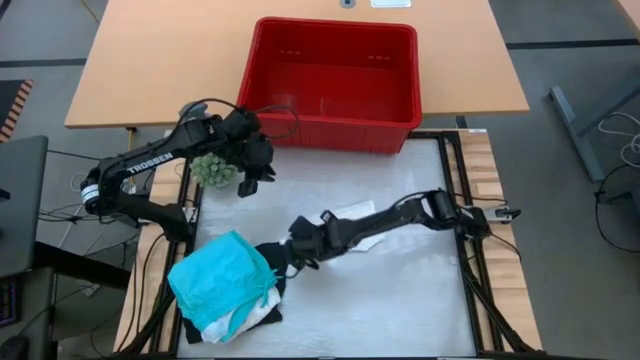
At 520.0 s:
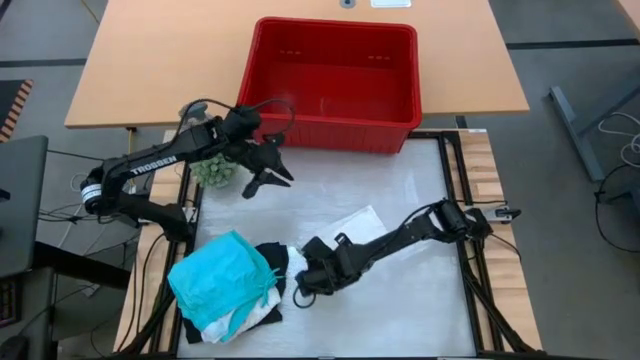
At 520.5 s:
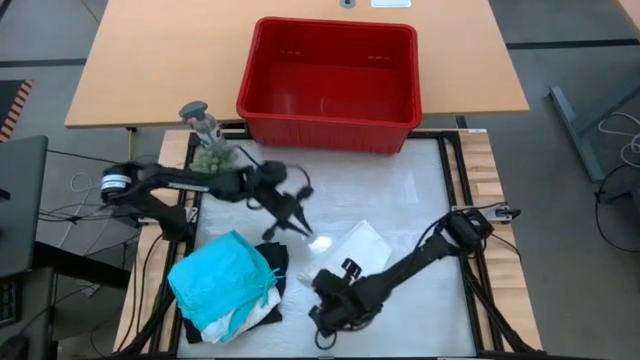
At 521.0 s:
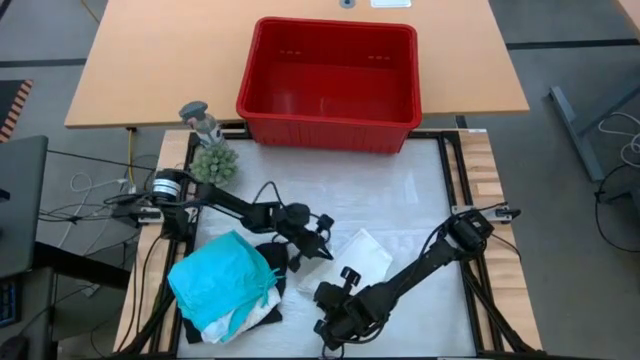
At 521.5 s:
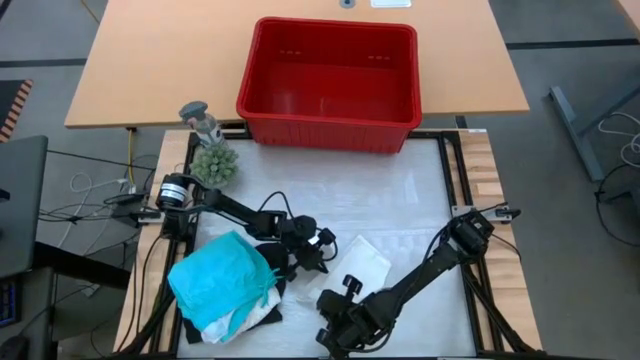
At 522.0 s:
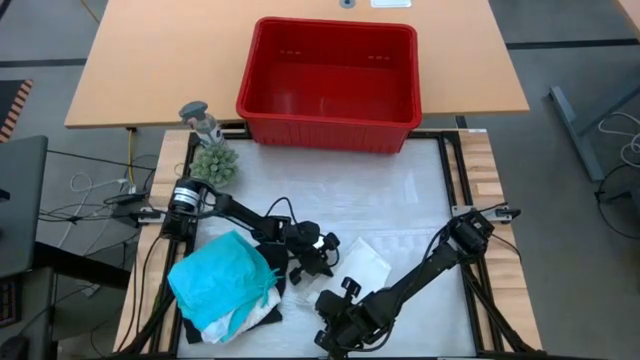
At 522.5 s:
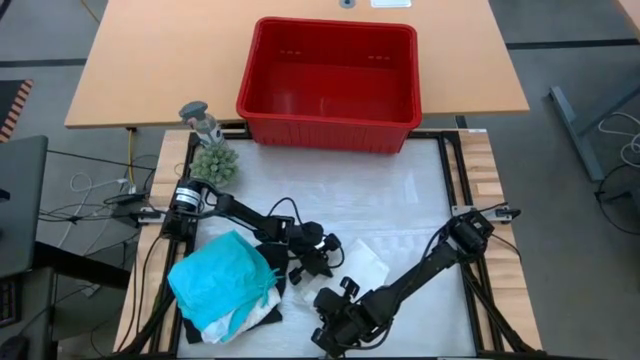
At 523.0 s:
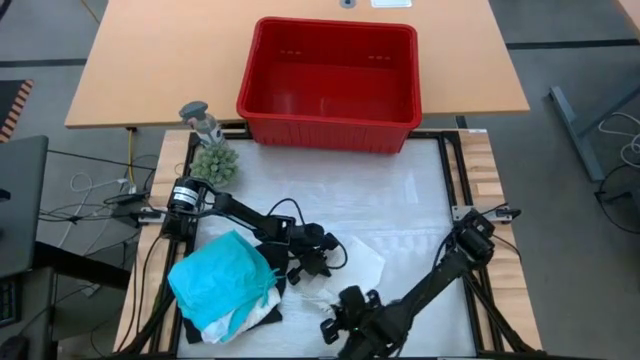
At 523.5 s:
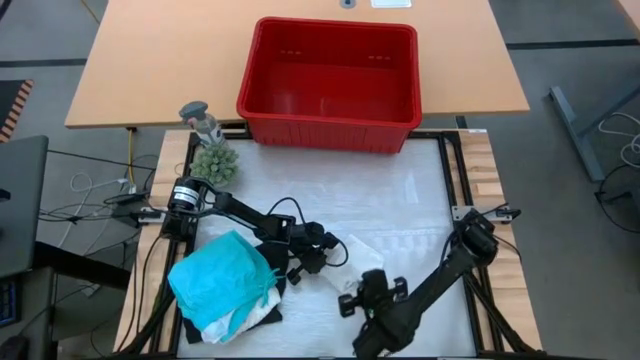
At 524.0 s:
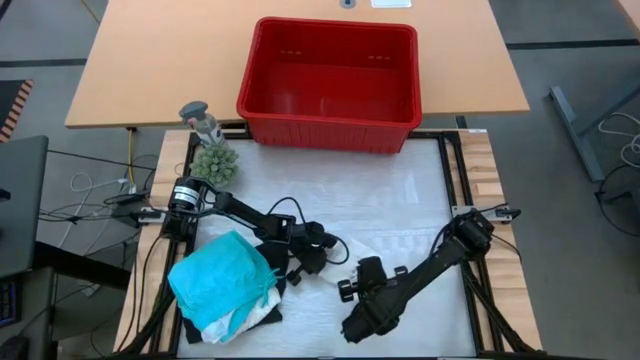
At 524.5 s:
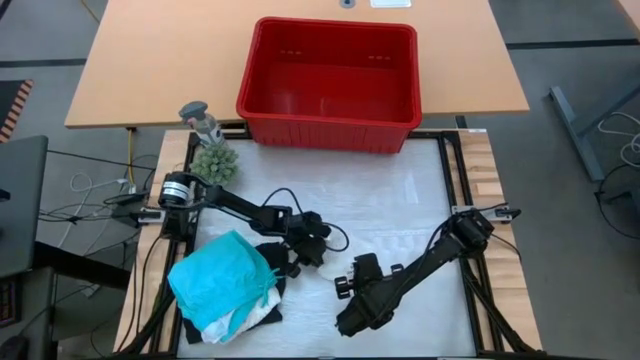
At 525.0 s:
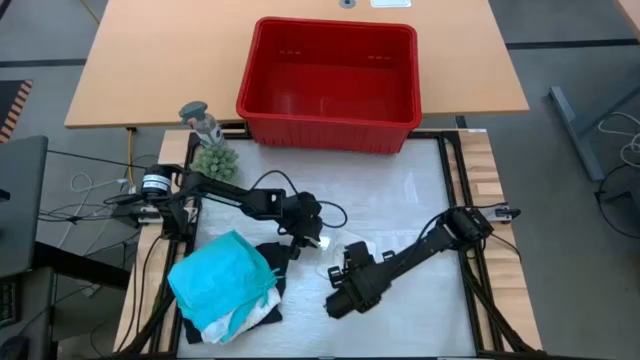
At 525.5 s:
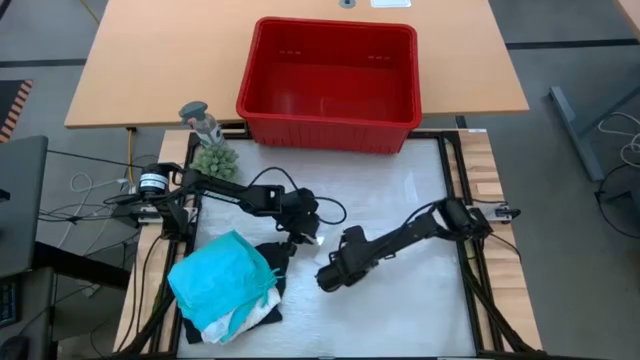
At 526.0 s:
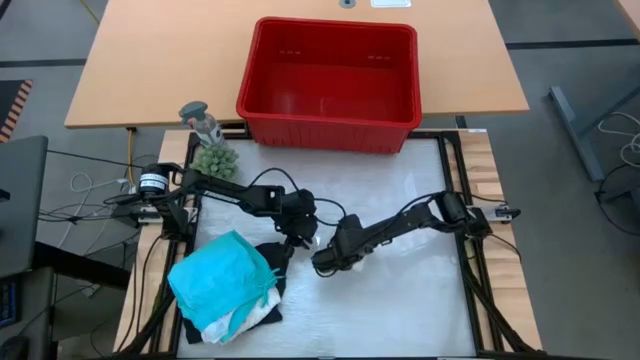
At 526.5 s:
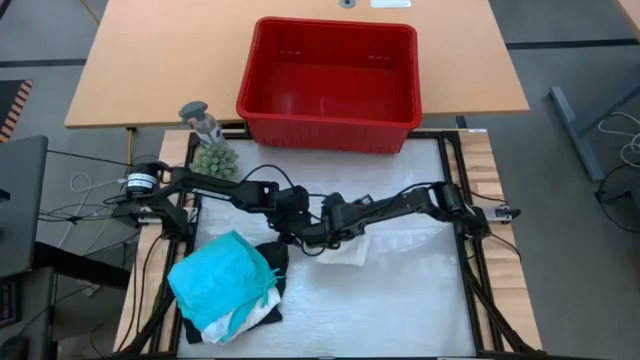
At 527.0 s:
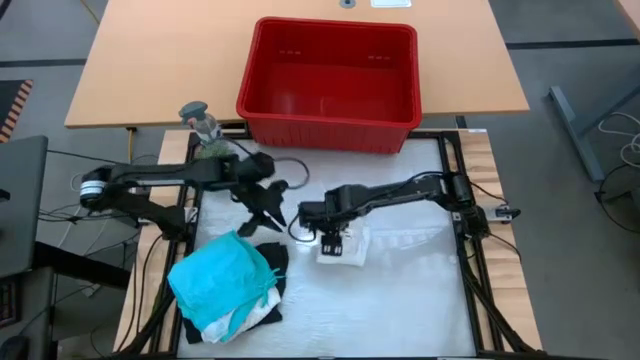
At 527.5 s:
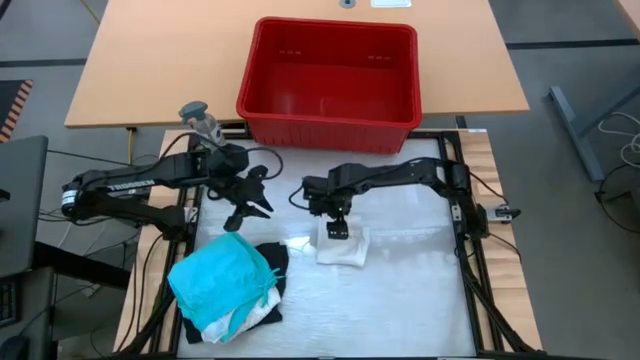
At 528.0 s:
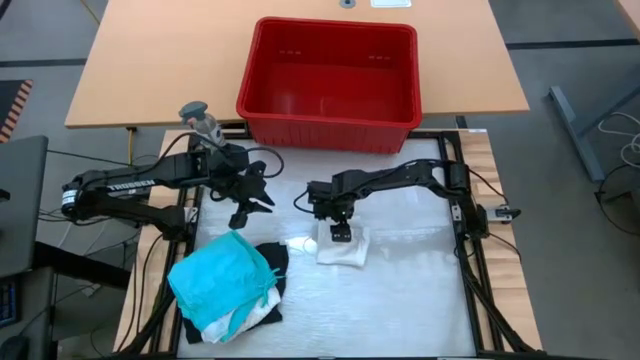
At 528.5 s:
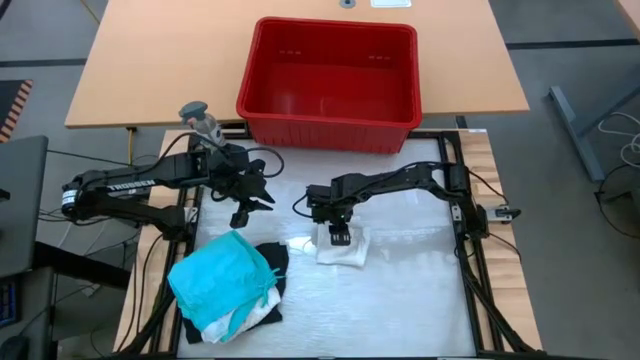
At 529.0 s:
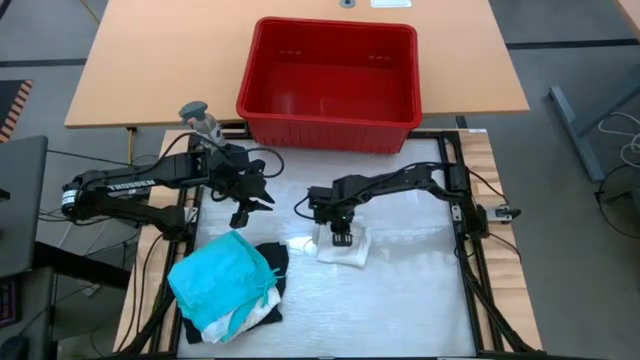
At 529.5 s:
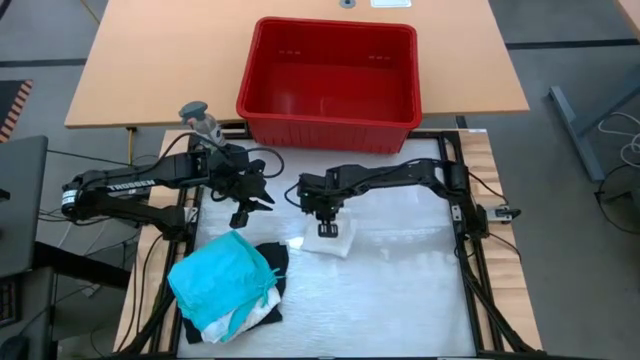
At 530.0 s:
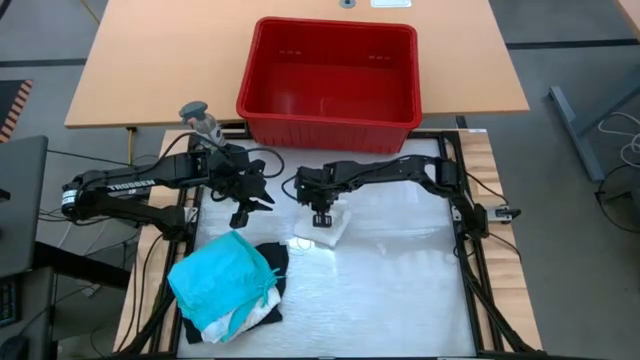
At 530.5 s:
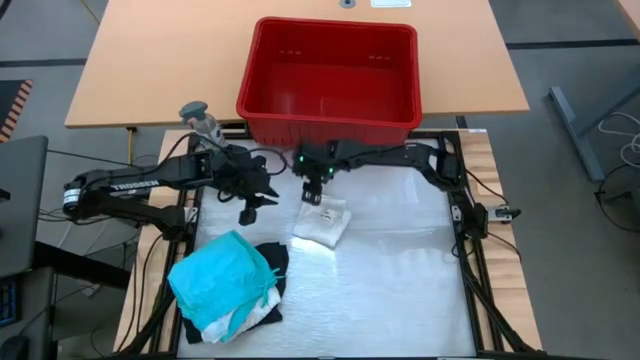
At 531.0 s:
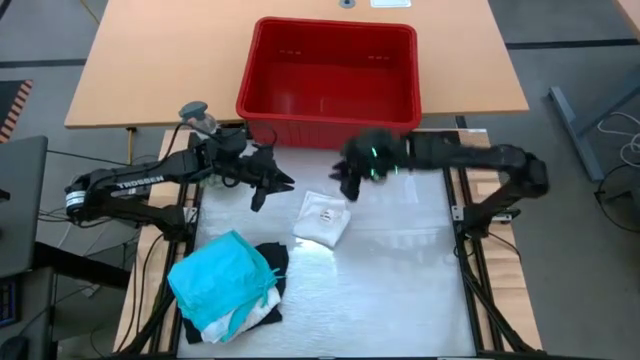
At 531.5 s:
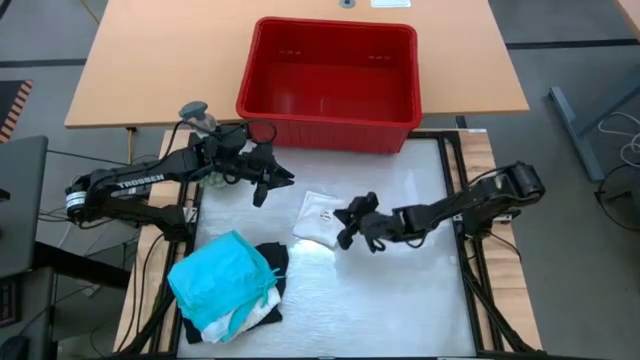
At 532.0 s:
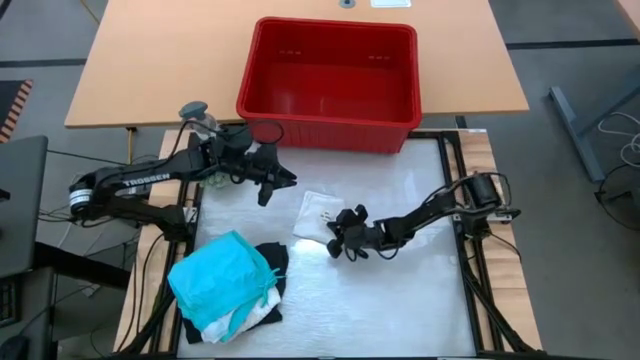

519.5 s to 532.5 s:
Task: Fold Laundry from Bin
Fold the white shorts

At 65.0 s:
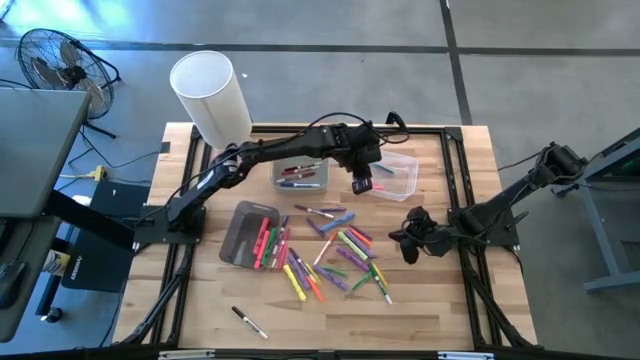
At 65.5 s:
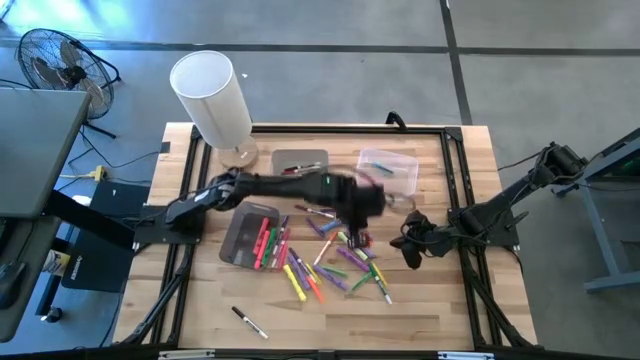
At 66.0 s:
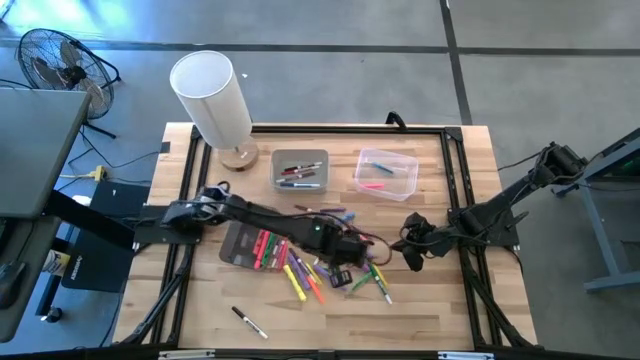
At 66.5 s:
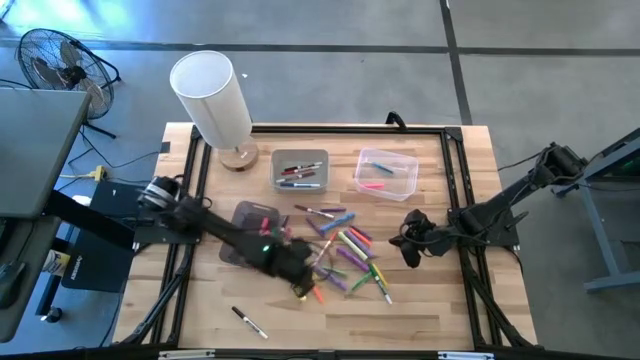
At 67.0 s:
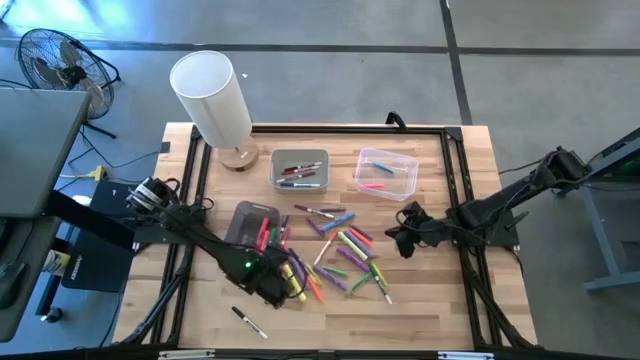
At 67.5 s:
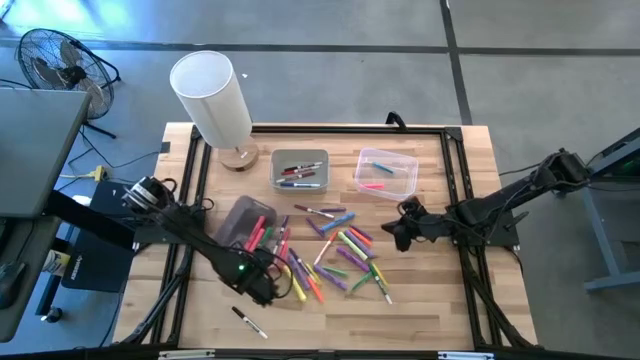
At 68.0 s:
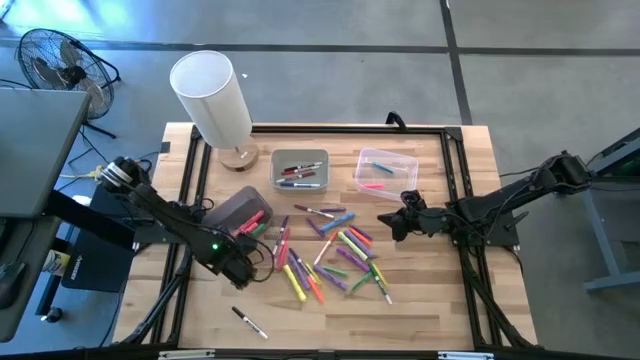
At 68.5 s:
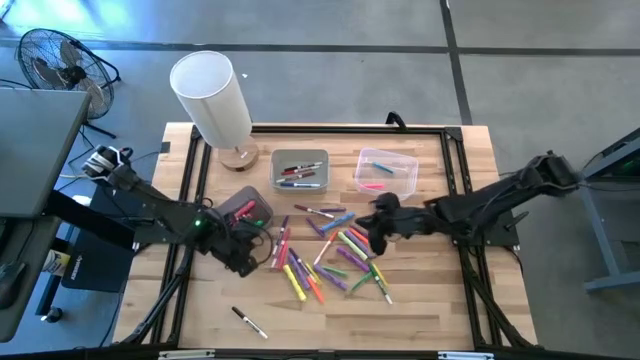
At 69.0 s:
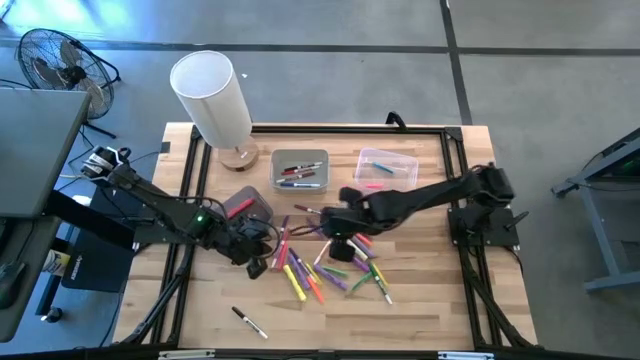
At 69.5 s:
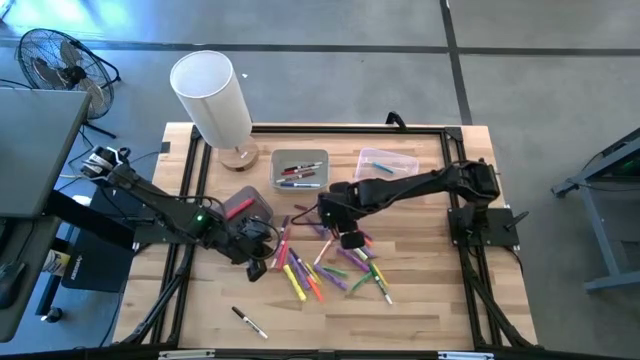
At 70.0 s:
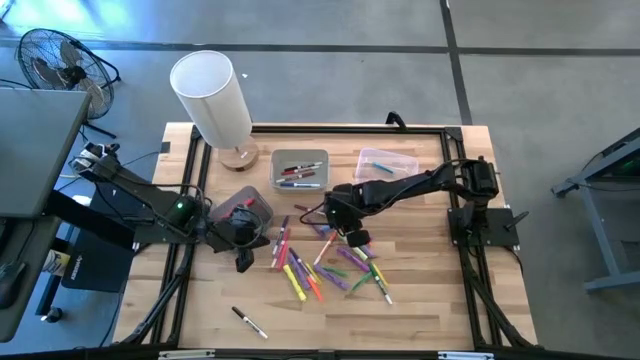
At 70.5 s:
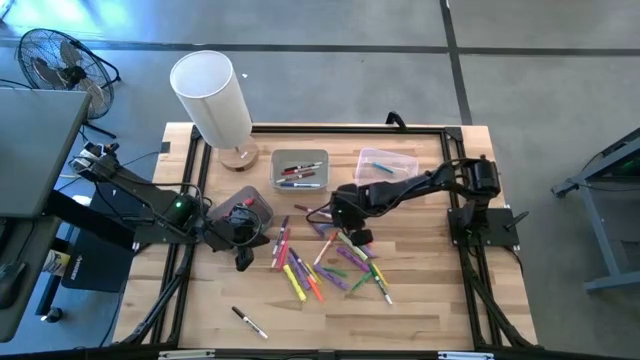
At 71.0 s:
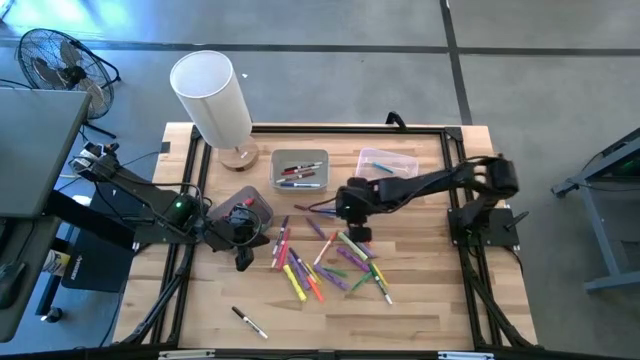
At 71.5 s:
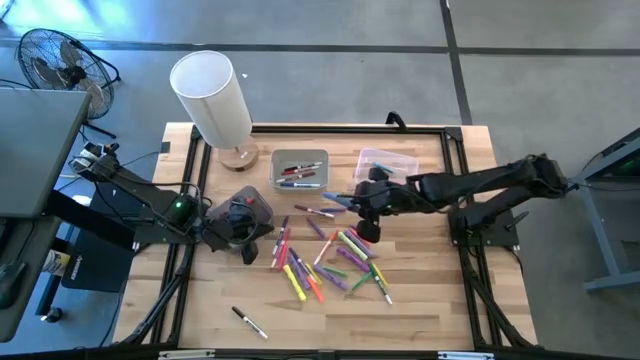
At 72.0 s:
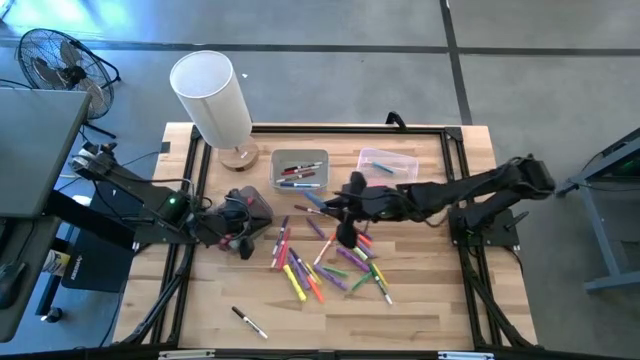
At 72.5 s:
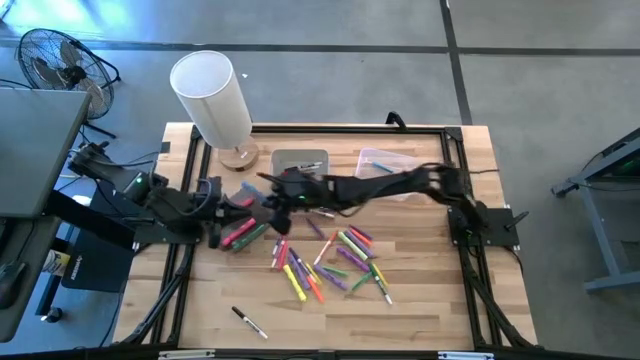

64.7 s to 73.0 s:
Task: Pick & Place Markers
Put the blue highlighter pen into the black bin
